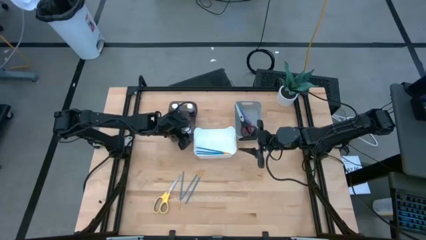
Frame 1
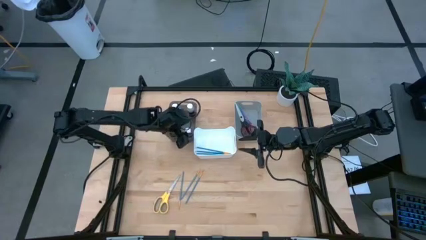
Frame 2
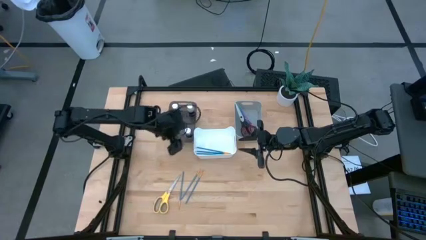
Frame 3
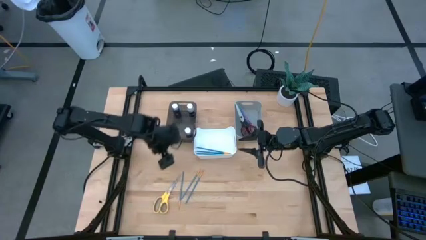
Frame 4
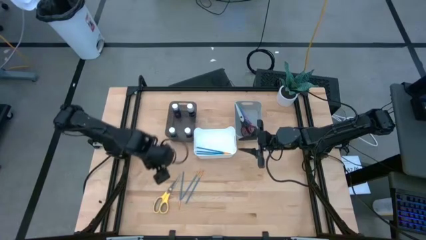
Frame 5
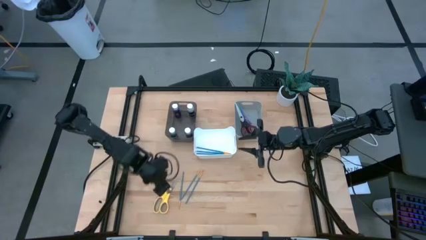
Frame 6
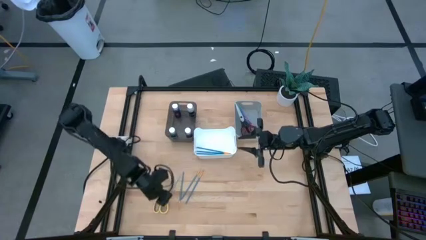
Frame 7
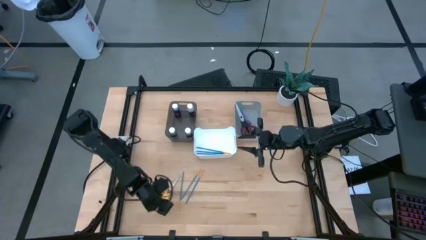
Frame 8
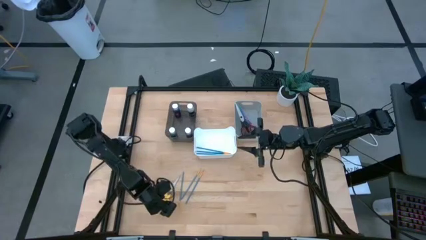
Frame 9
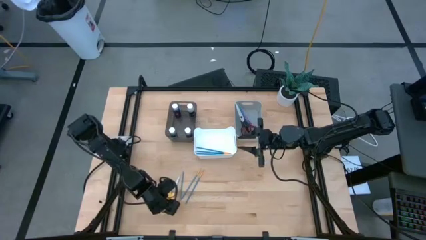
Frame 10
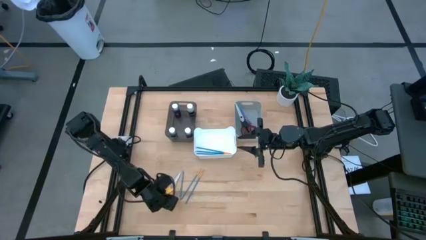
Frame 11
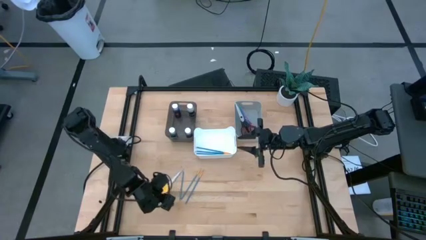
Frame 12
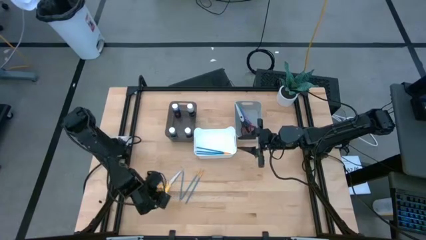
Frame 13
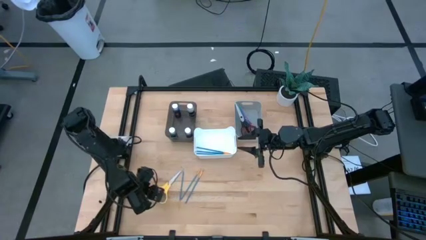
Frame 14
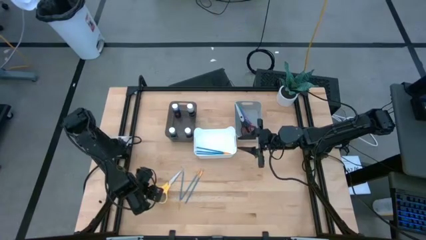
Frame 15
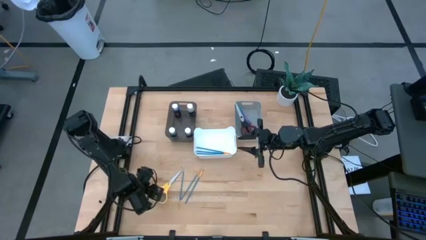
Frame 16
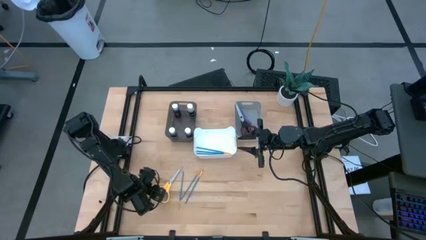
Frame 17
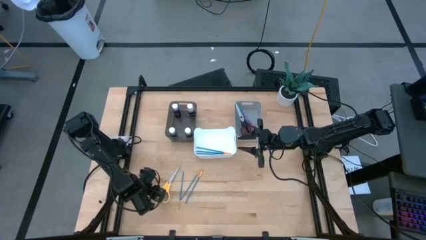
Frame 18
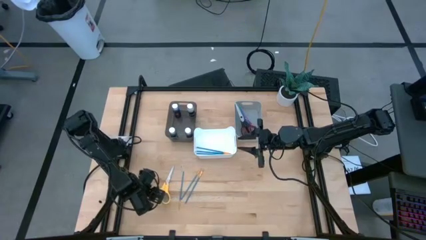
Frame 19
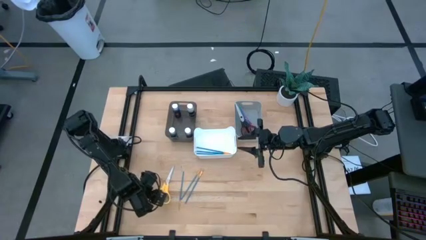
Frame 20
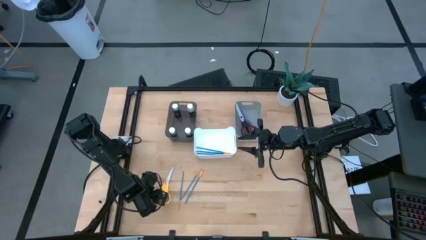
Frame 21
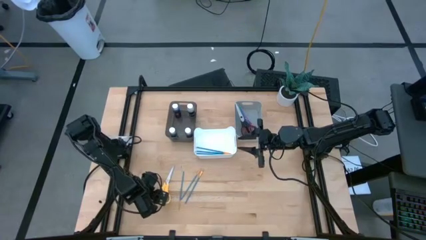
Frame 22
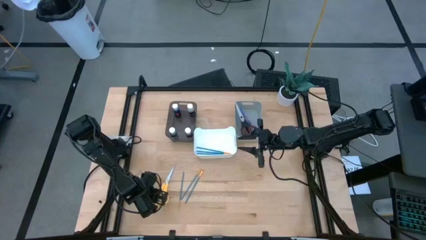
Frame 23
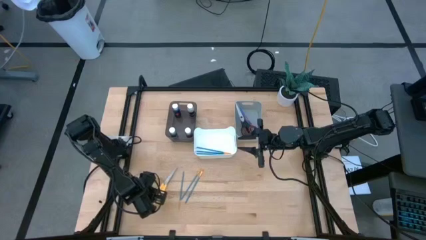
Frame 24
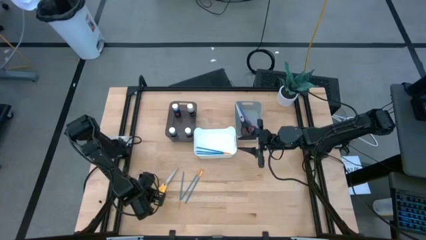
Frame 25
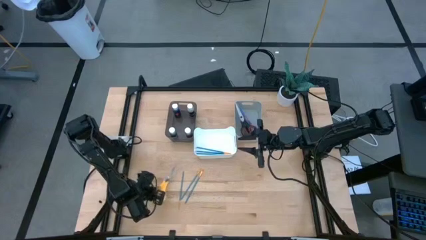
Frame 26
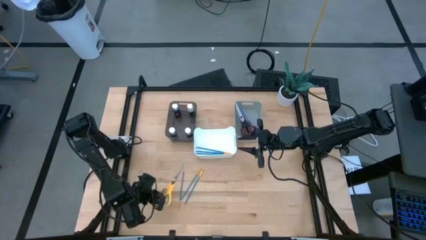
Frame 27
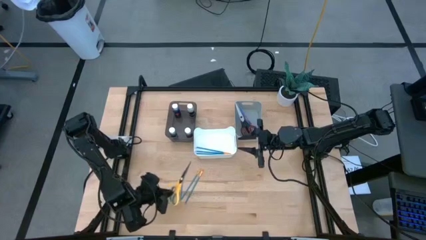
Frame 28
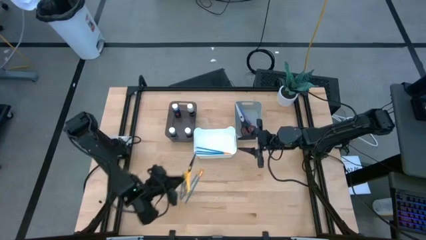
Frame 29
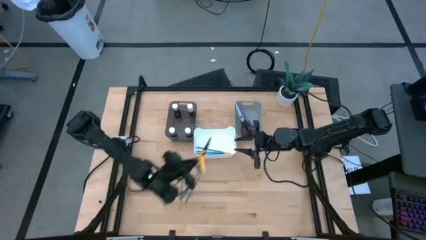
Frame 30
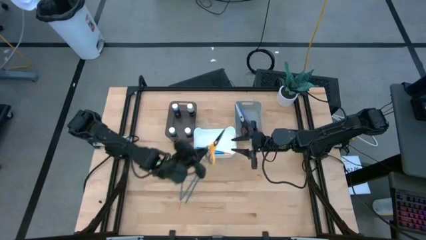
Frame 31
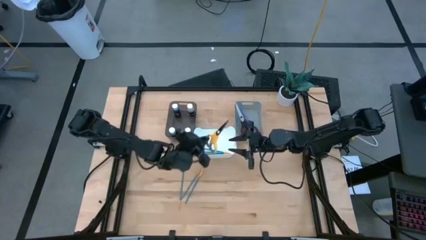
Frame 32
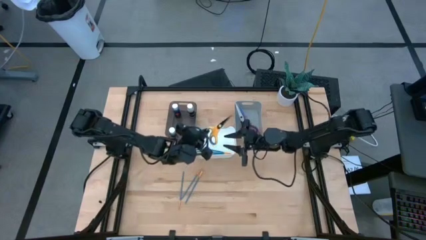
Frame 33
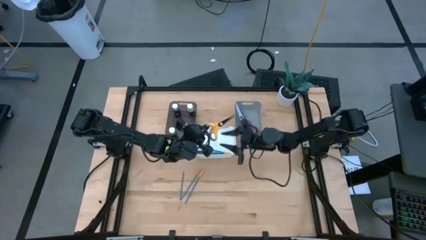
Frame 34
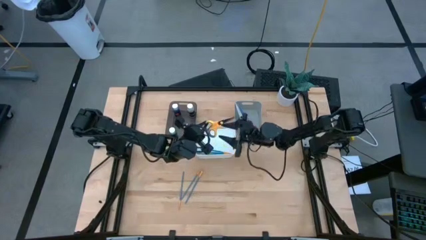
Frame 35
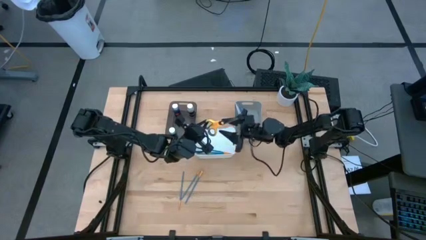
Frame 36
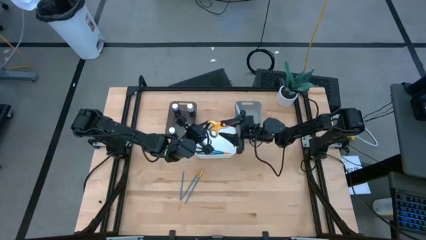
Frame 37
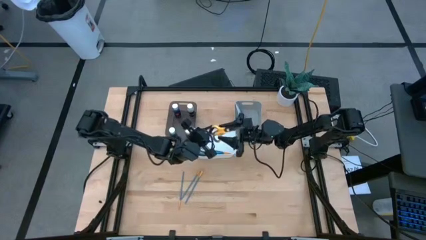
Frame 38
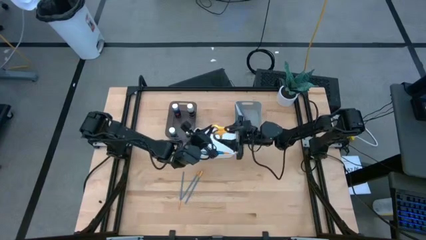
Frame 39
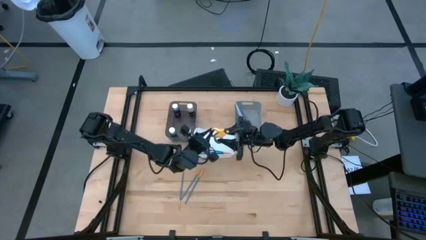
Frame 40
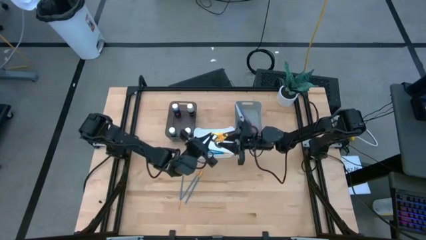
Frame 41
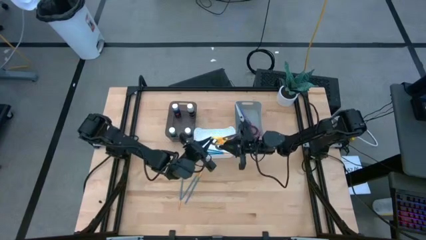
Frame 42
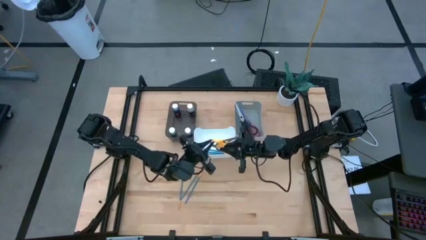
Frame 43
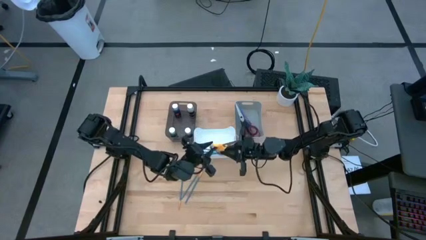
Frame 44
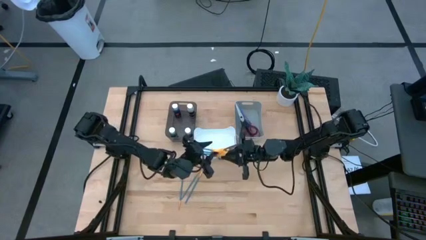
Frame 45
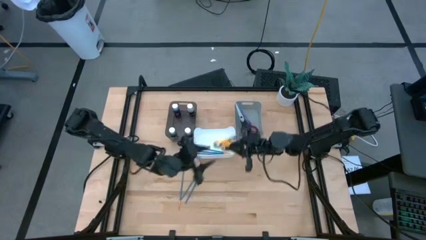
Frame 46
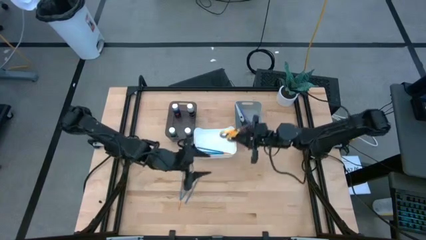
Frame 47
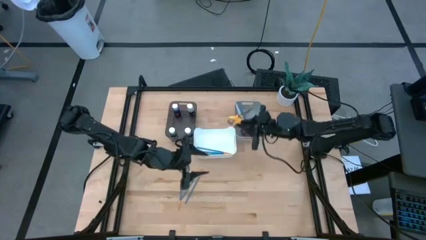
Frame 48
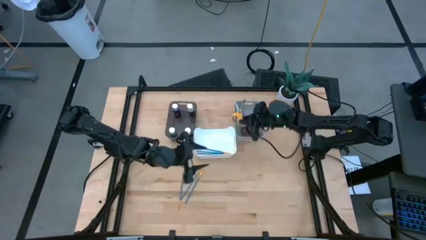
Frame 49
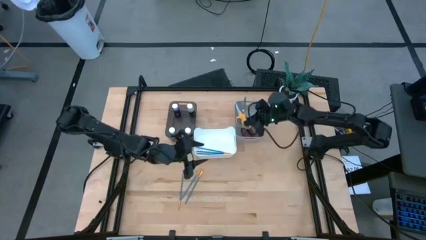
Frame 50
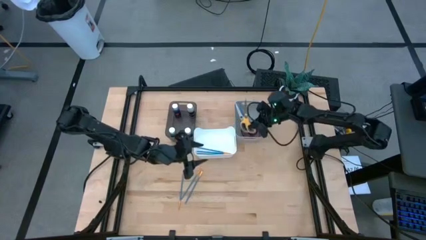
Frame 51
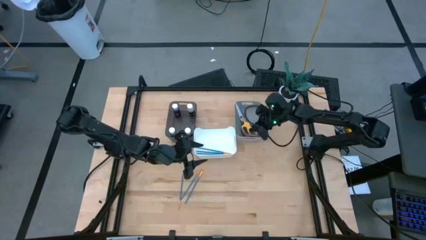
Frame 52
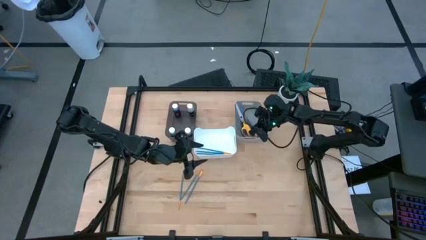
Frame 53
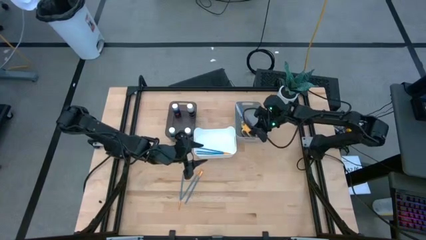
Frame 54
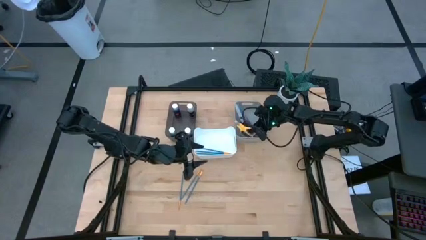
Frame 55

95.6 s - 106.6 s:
Task: Pick & Place Paint Supplies
Put the yellow scissors into the gray bin

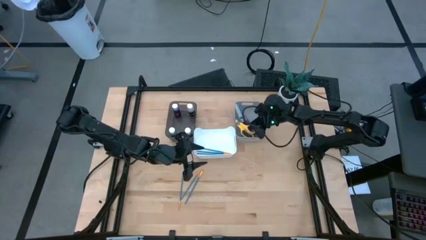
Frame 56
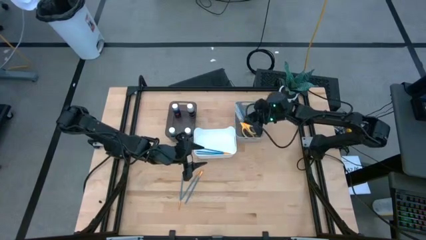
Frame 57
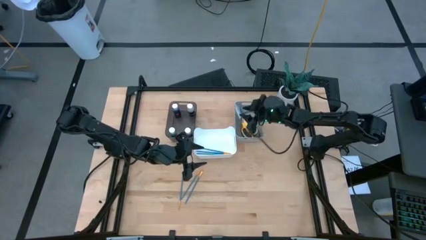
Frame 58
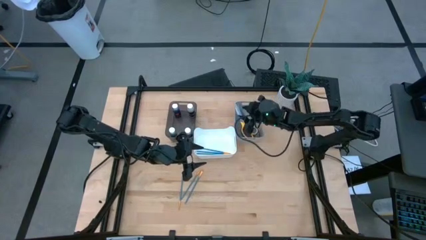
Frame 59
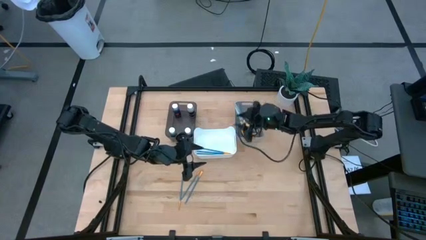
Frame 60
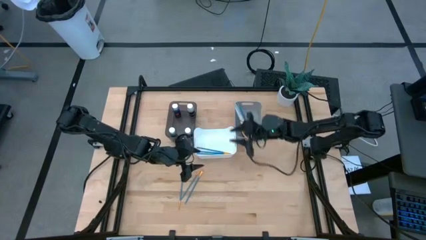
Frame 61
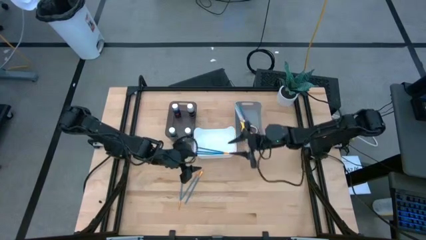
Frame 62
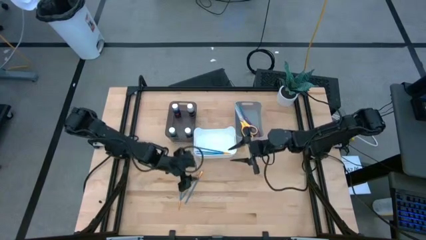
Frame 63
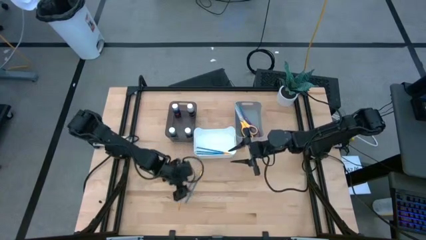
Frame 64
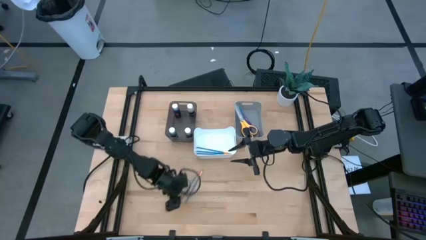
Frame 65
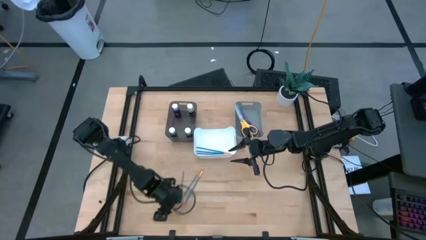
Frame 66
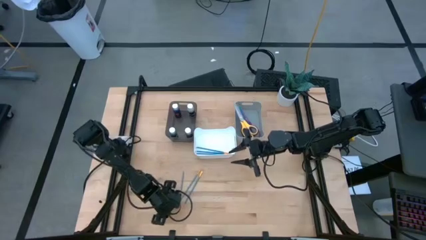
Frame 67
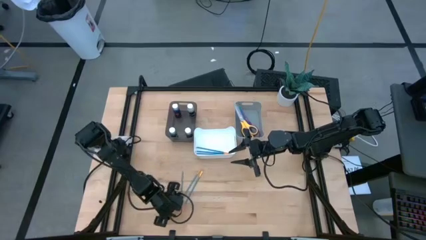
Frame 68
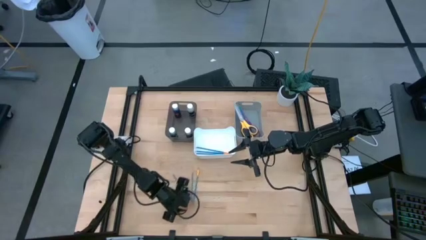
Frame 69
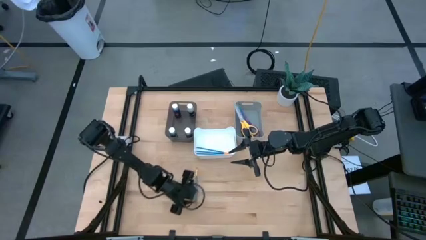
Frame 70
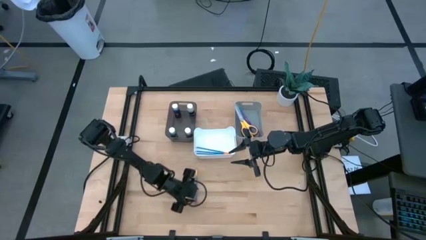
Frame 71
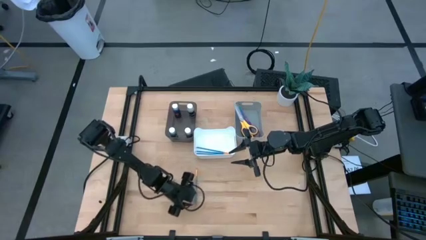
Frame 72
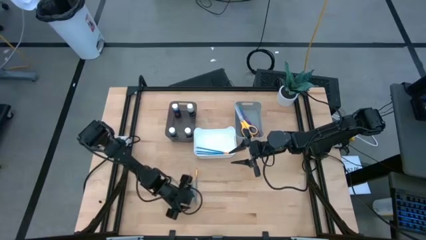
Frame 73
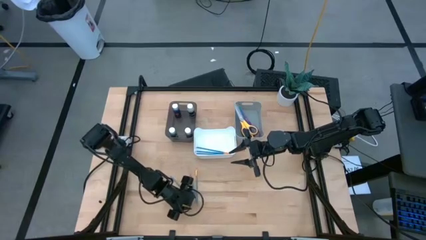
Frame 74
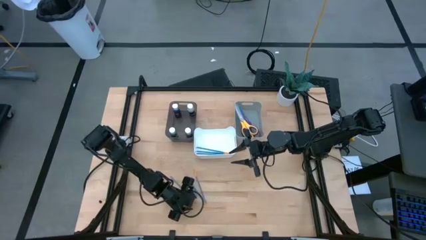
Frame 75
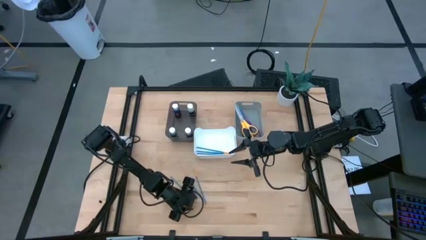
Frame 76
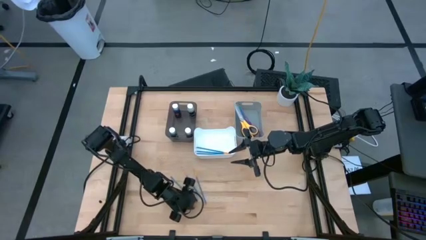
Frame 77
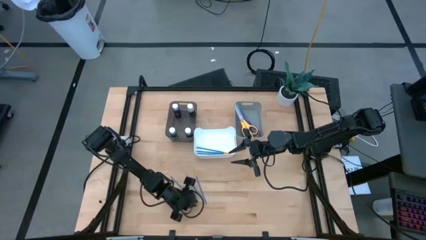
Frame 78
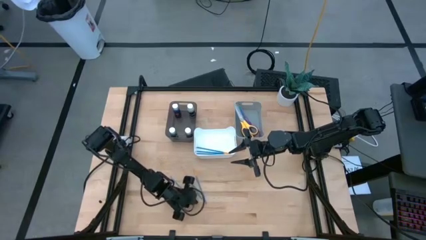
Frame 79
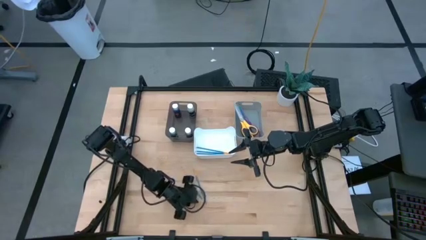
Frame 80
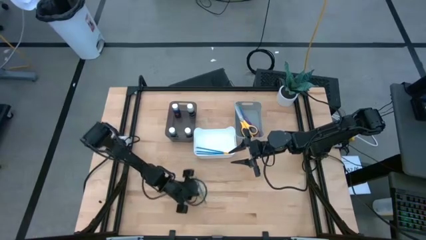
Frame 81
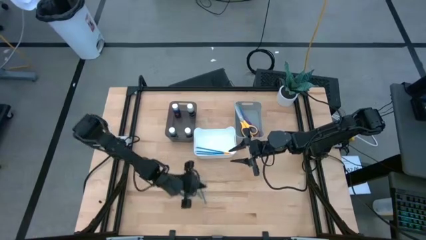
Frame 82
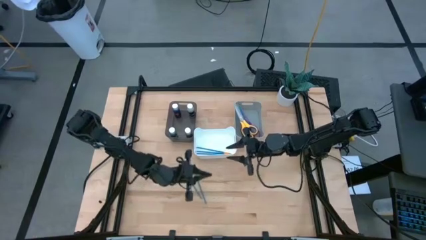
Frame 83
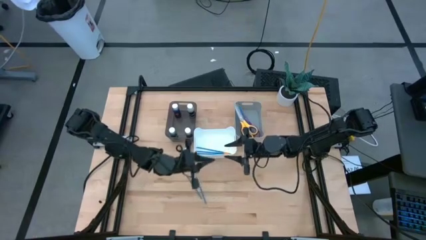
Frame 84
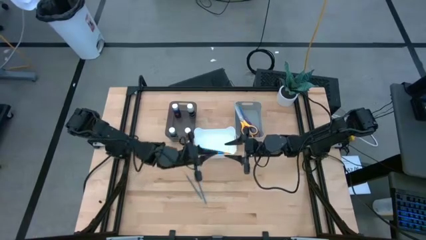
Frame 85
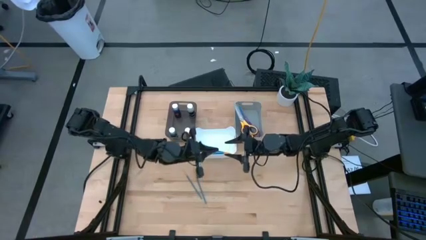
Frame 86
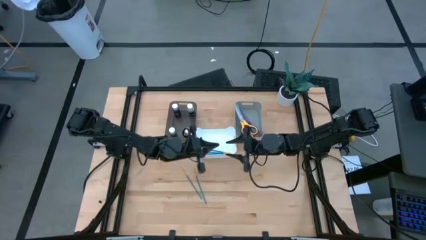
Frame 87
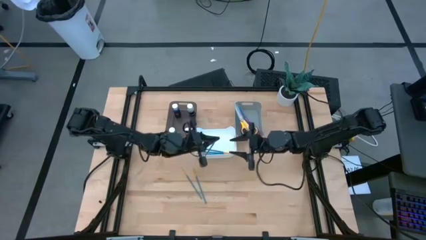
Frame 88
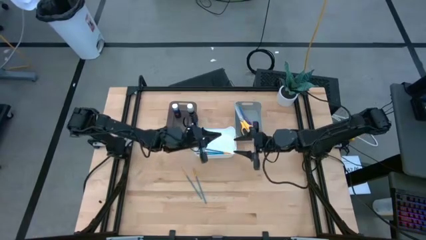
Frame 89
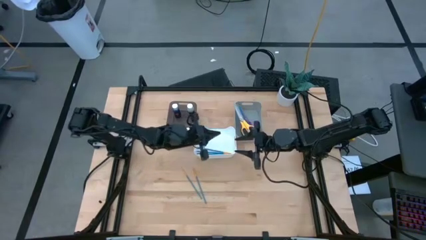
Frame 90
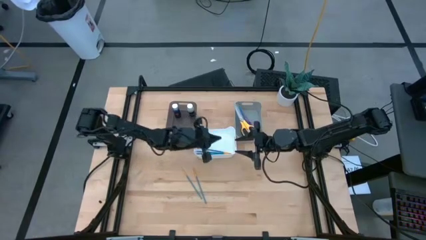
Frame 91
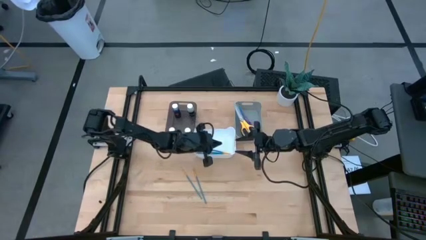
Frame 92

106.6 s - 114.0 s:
Put the blue paint brush into the white bin
